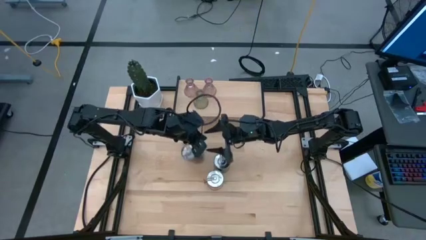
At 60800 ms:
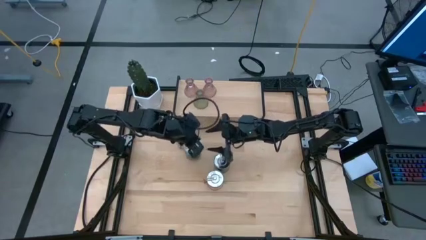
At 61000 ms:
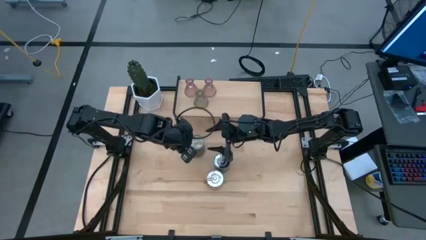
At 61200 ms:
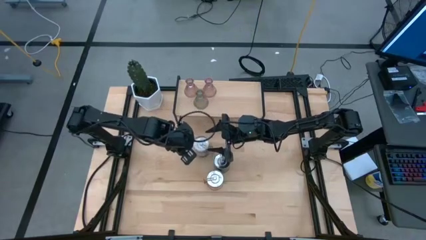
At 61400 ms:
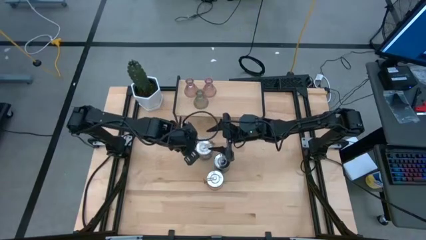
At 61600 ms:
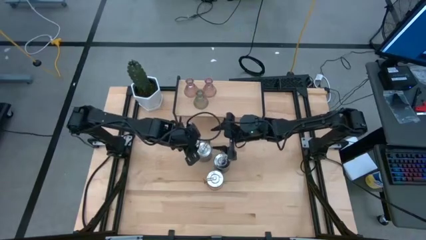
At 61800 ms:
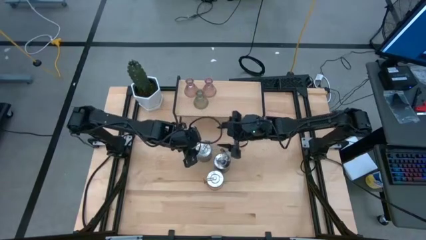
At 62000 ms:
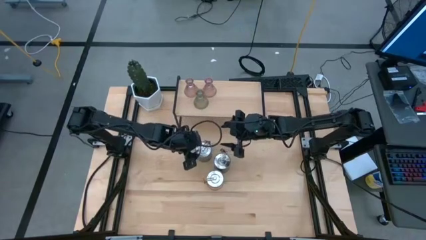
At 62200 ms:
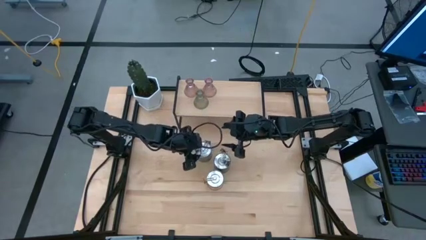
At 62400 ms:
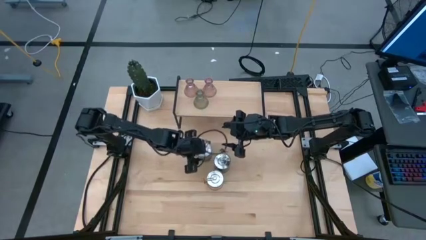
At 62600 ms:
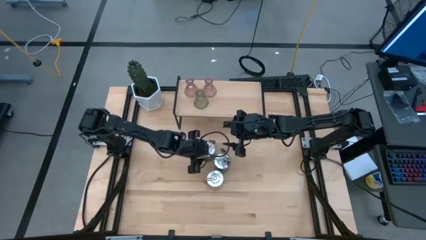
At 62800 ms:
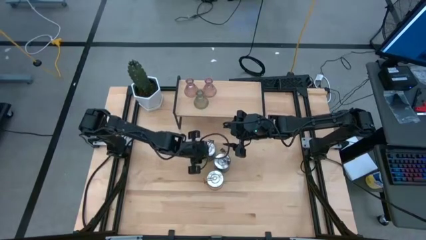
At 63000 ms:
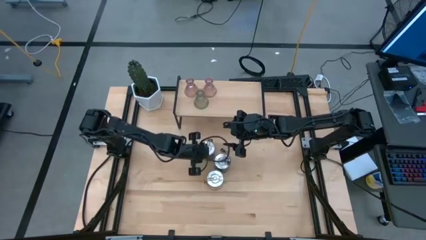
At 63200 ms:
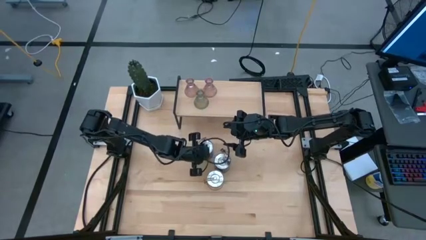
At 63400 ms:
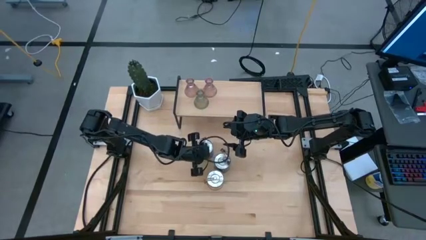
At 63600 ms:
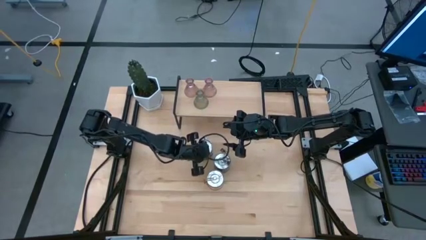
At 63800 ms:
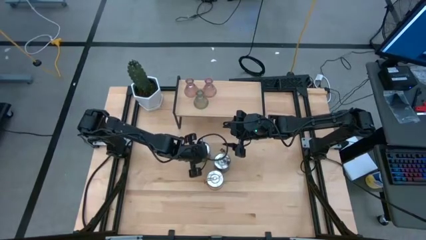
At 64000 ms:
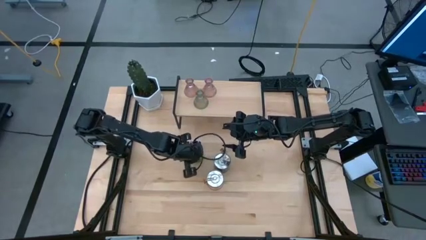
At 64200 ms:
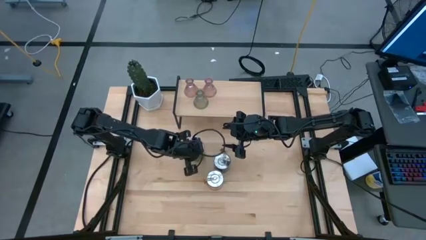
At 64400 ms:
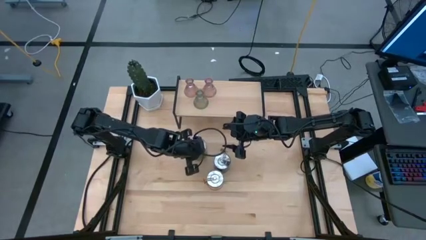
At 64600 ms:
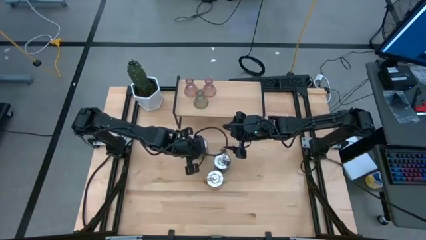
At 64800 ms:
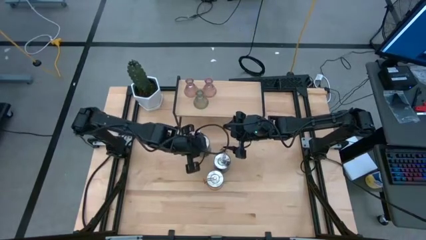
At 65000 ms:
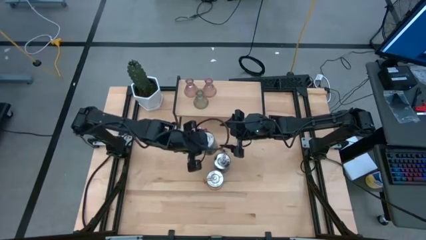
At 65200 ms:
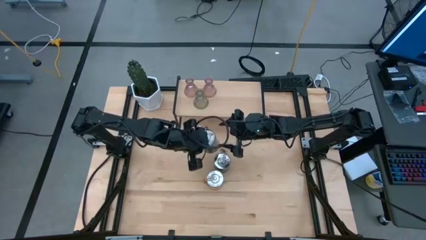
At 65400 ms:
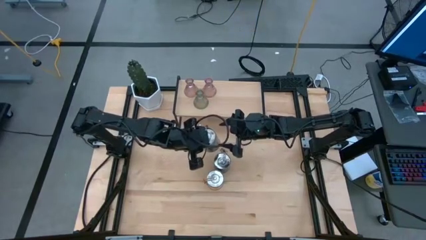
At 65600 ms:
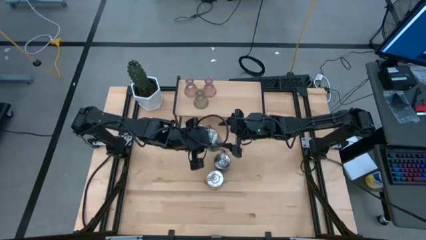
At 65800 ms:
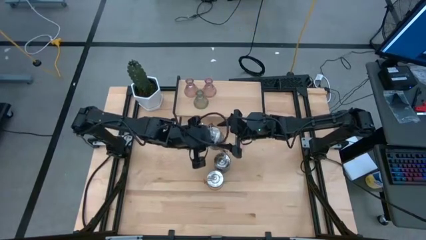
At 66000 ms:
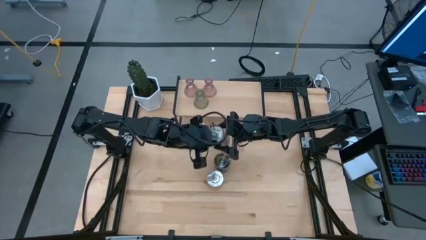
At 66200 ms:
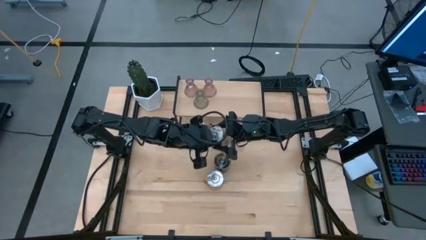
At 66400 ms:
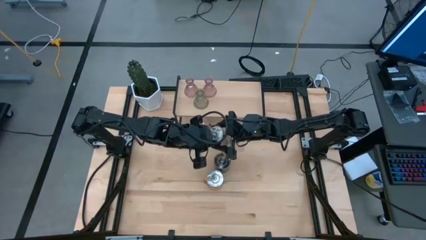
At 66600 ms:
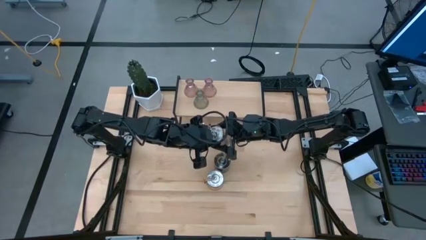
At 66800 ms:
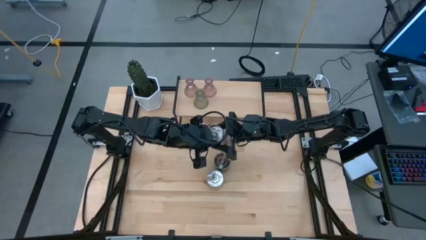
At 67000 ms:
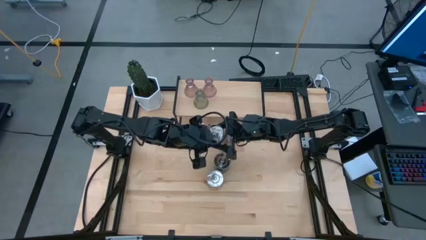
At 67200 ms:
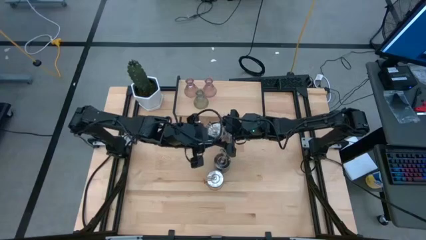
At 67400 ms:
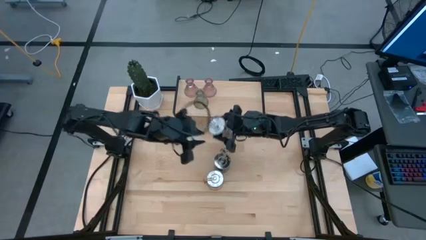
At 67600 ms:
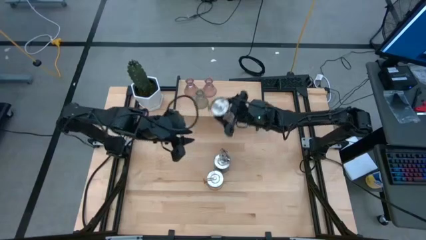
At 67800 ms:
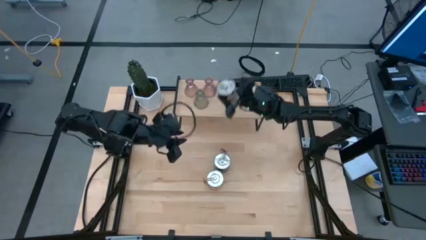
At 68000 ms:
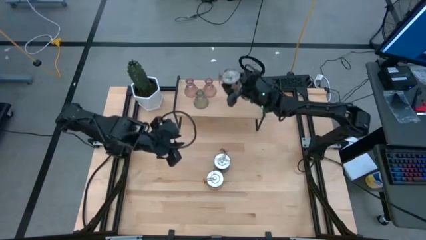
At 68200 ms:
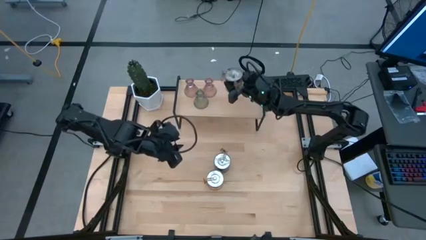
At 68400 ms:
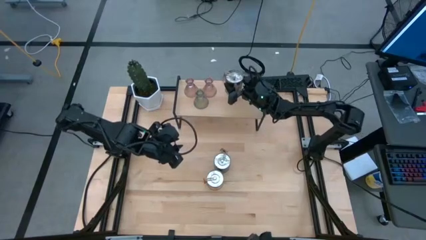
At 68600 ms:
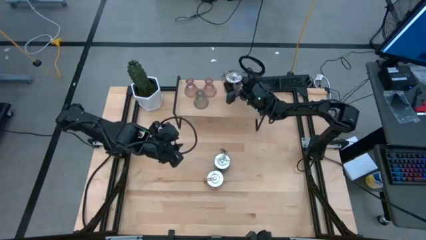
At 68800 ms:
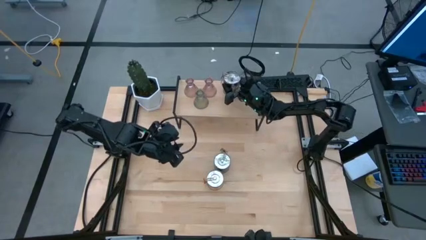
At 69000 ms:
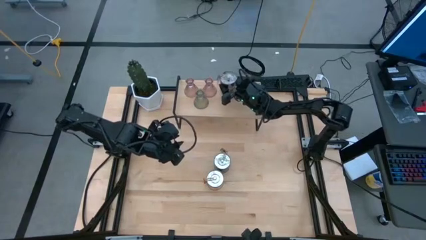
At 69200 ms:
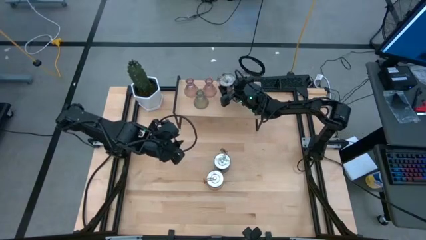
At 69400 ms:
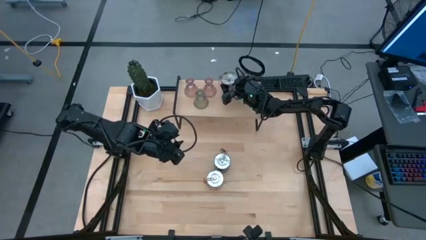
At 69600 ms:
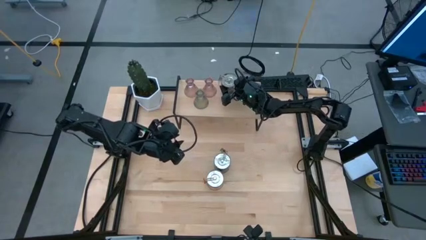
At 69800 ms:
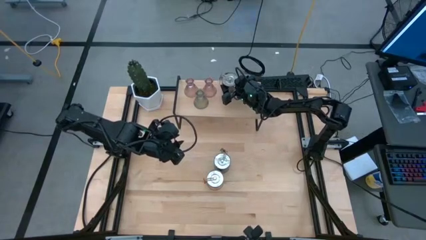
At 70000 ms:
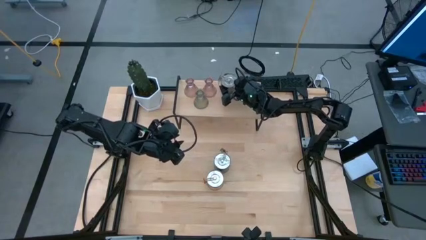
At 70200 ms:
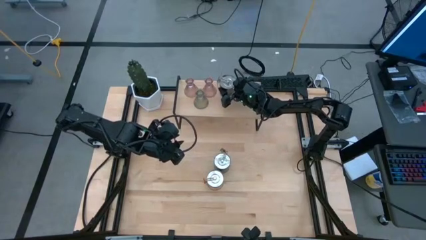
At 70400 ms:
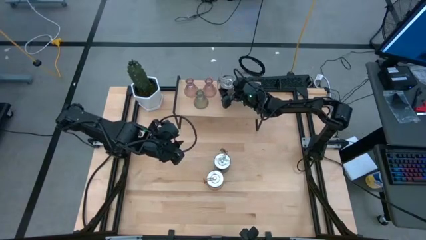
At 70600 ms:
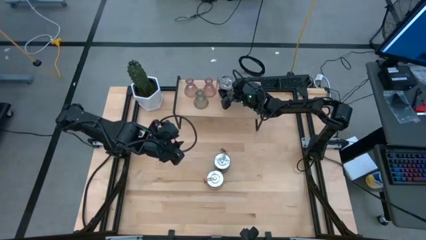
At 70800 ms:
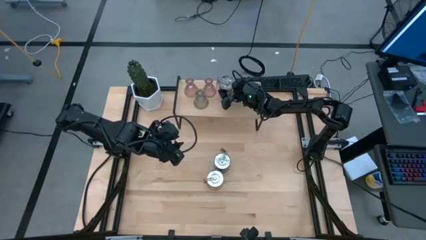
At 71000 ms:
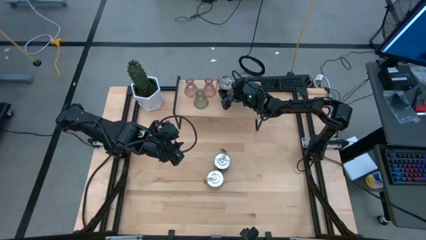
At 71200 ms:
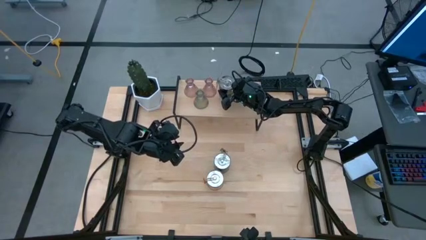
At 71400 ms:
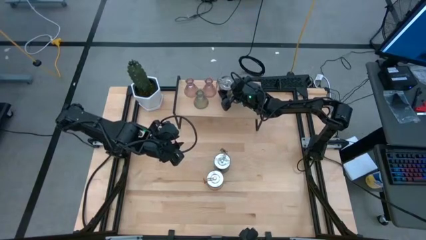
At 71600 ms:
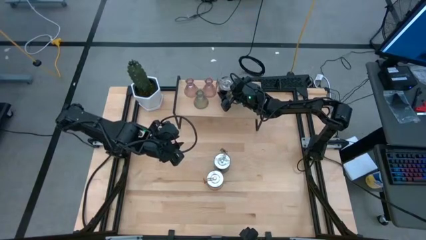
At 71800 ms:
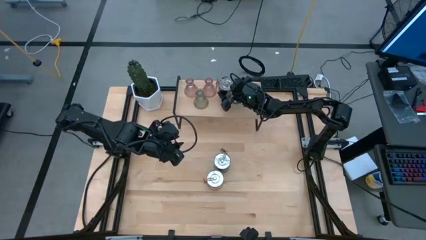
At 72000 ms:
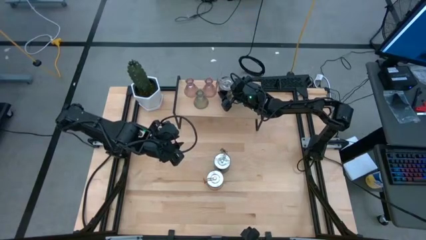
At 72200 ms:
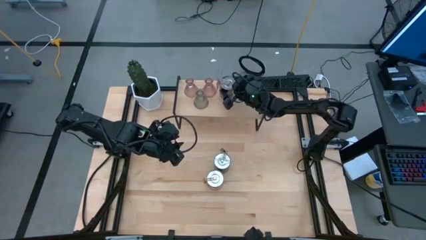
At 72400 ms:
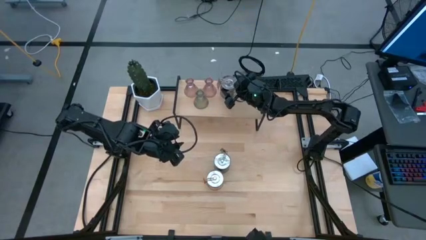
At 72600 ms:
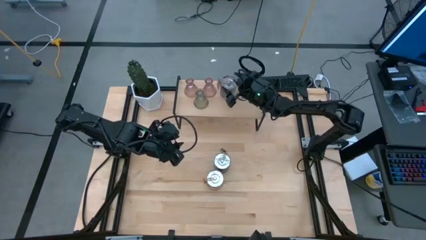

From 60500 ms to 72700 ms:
Task: Pick & Place candle stick holders
Put the left brown scented candle on the shelf

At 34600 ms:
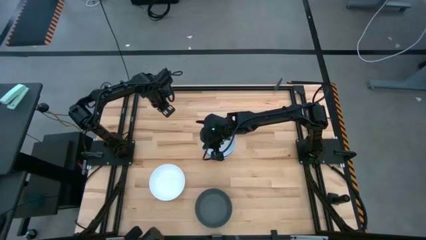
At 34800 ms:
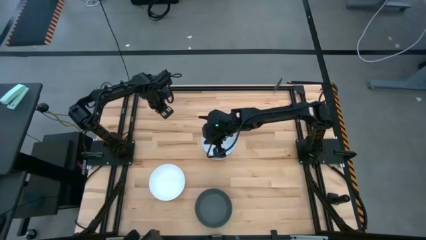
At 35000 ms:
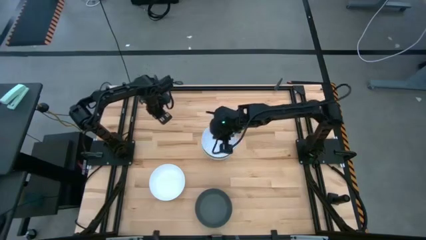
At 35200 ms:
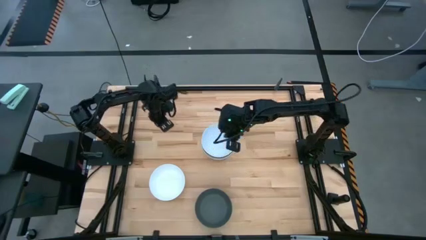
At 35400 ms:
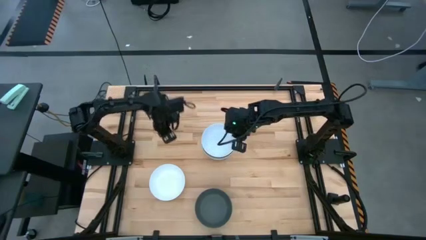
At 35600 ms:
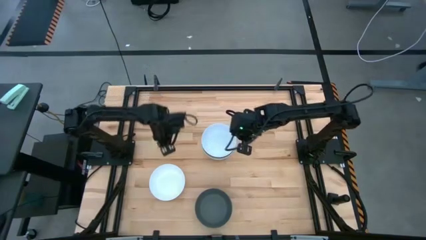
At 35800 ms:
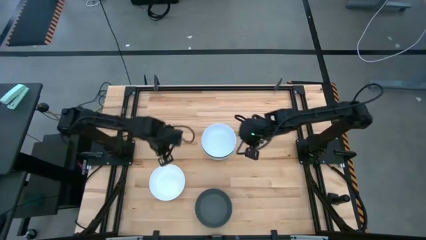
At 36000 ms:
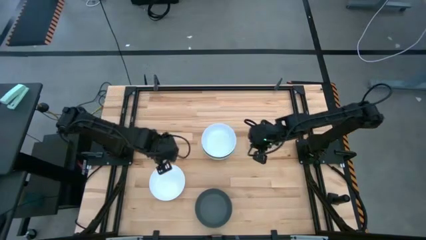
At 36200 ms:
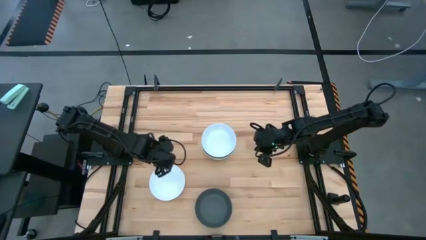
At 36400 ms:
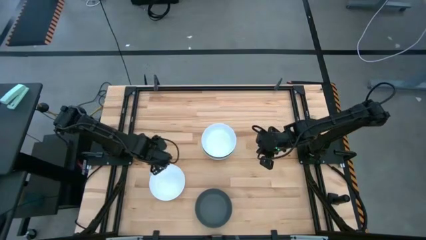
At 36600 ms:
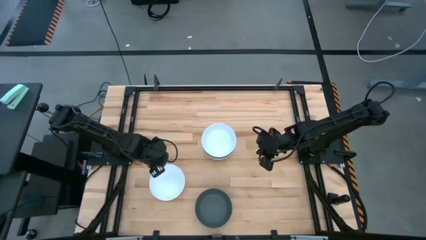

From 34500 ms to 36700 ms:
Task: Nest bowls inside each other
Stack the white bowl on top of the stacked bowls
